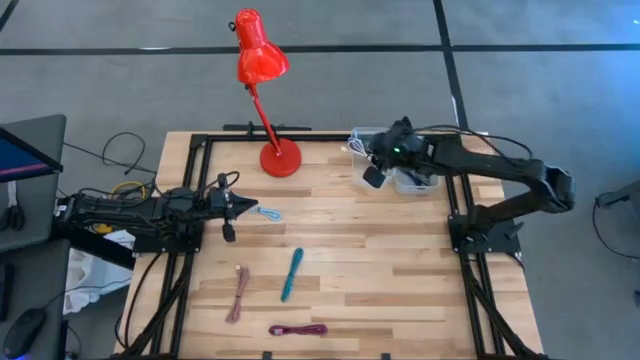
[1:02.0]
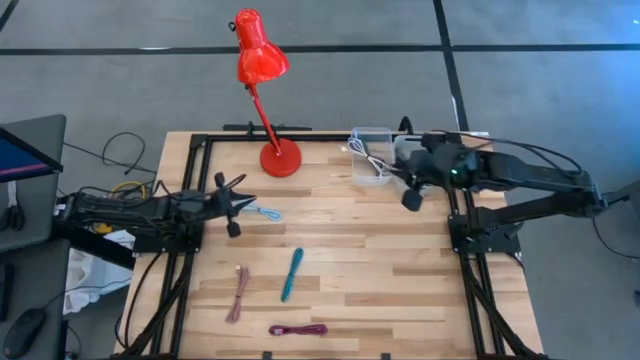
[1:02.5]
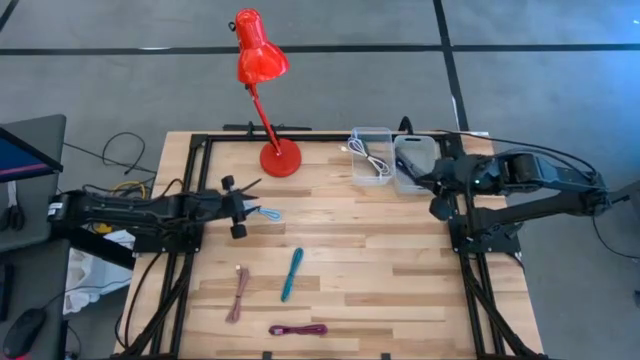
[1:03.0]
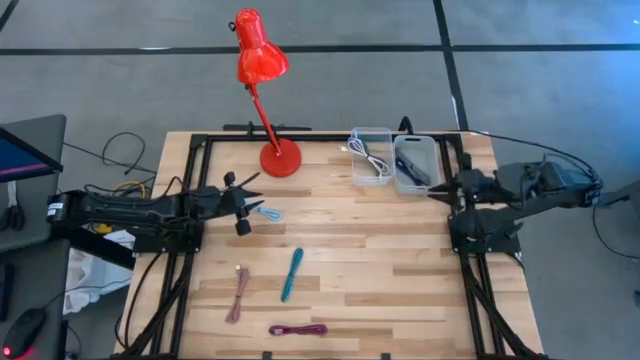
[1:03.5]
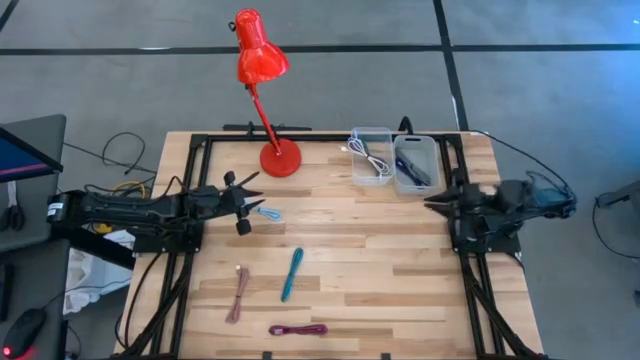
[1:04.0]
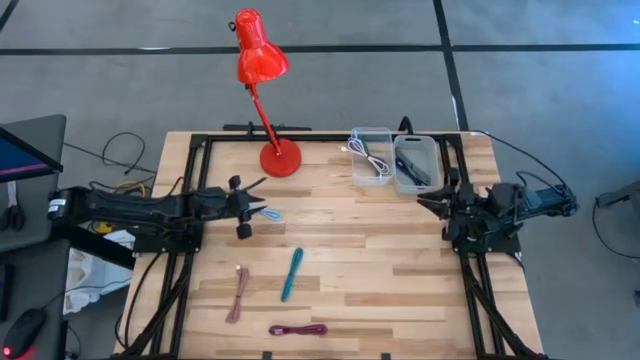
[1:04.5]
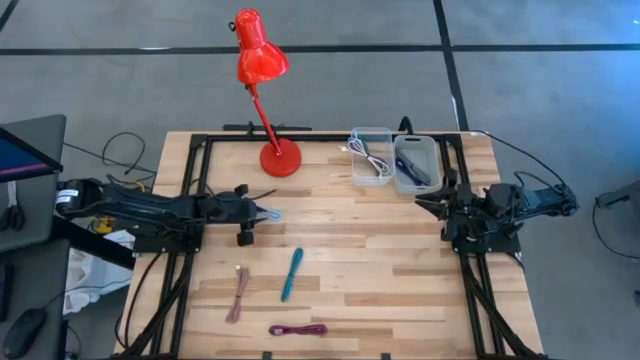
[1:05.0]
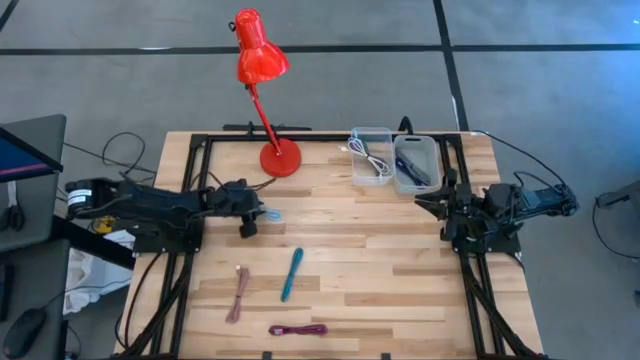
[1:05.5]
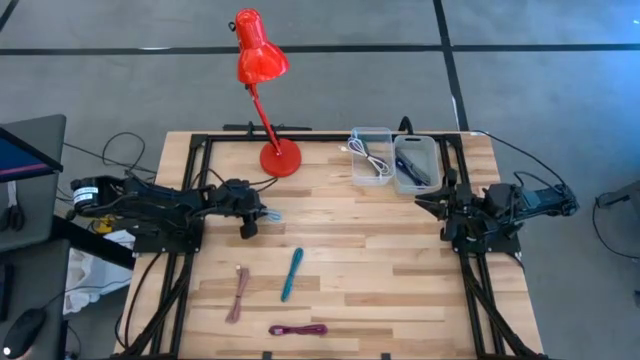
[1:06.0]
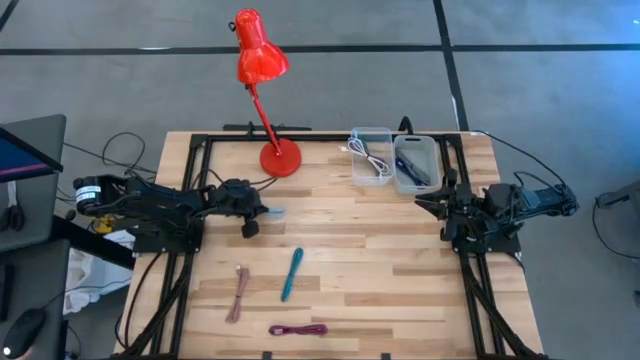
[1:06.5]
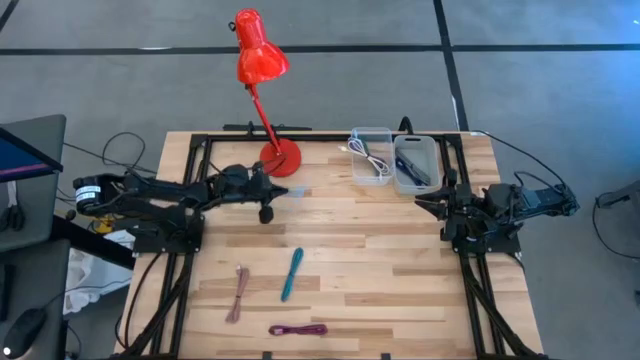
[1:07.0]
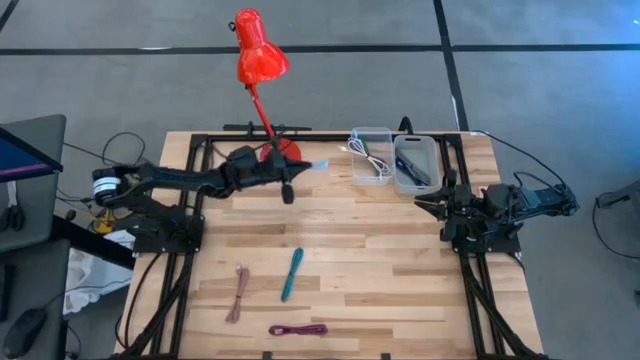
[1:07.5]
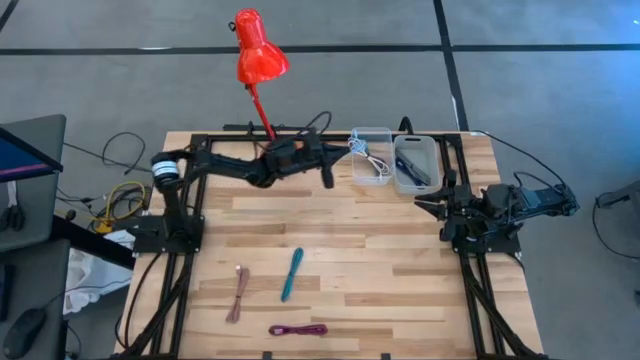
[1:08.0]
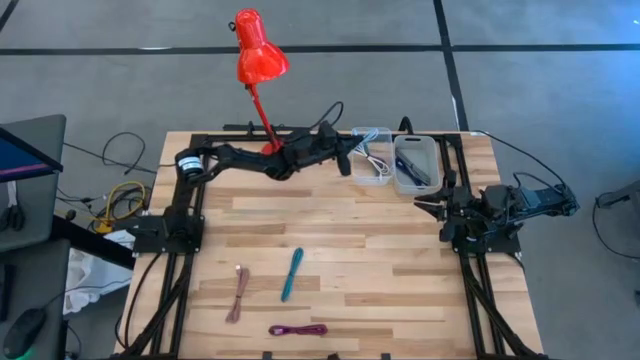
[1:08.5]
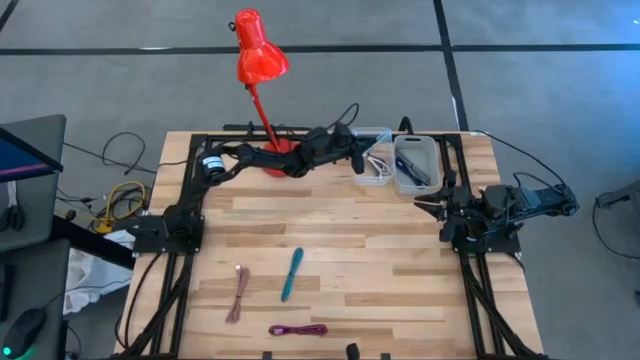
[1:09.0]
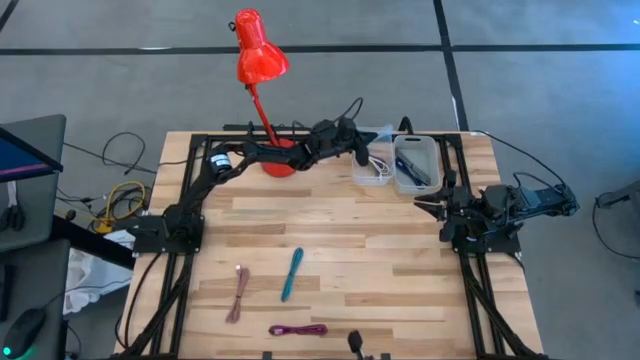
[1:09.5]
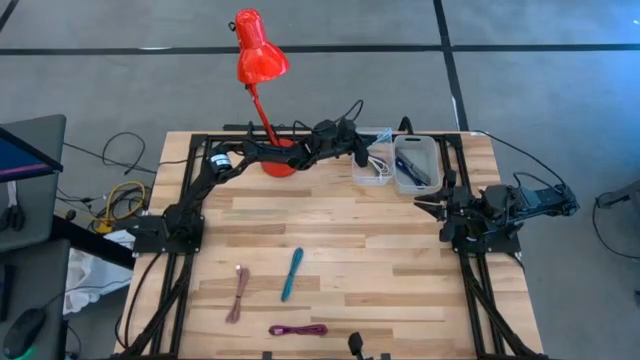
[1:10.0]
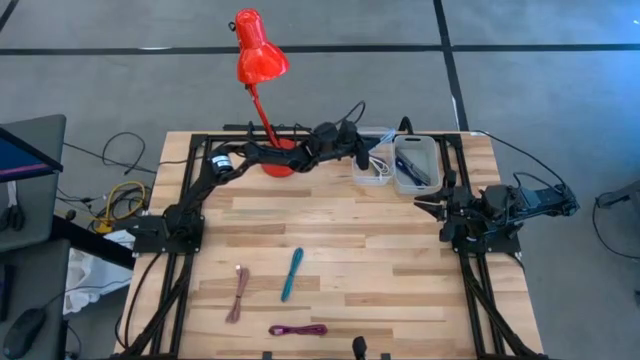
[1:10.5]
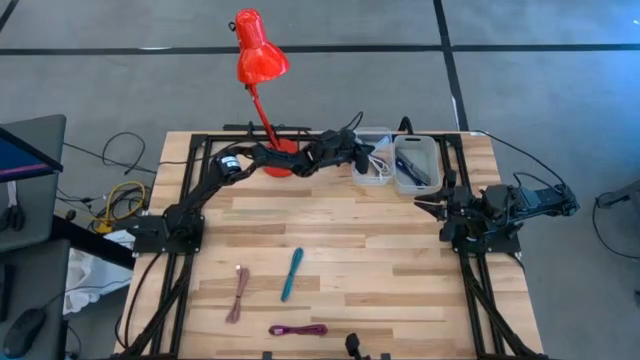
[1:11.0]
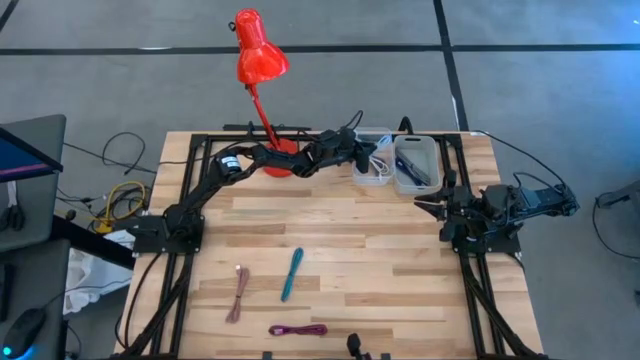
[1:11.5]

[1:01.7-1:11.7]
Task: Pick & Place USB Port
Put the light blue charger cable into the transparent bin

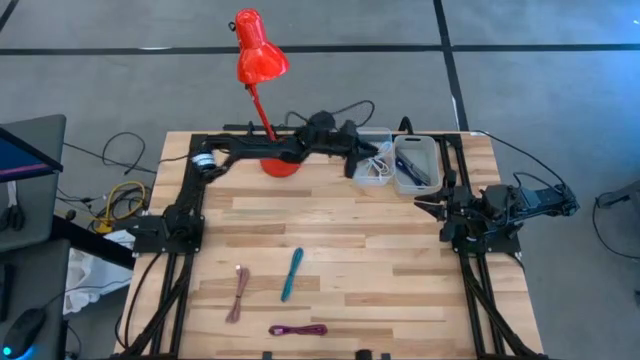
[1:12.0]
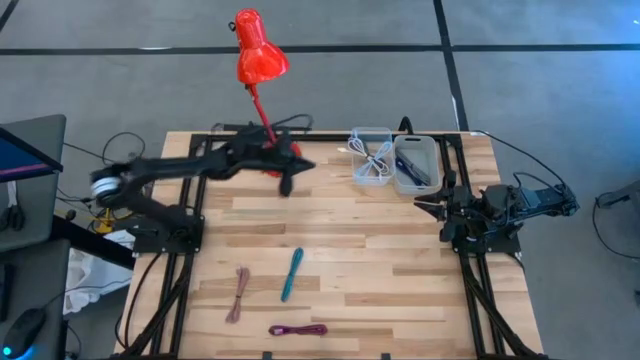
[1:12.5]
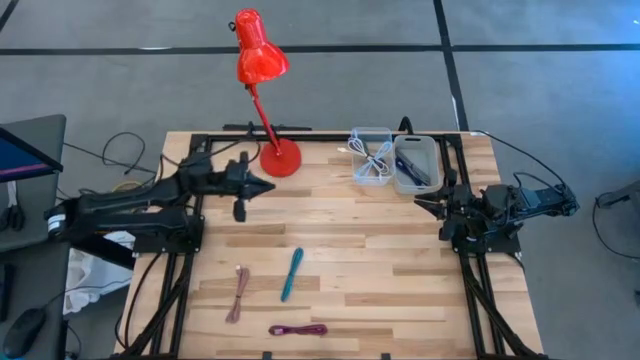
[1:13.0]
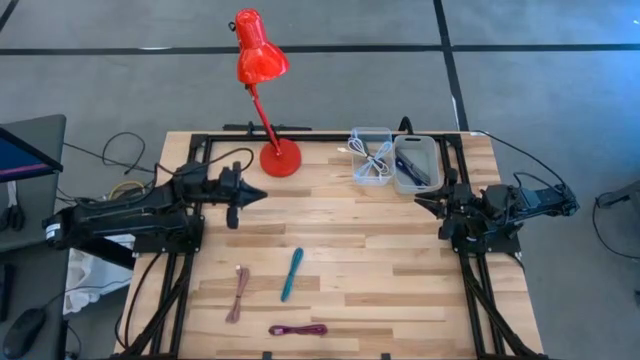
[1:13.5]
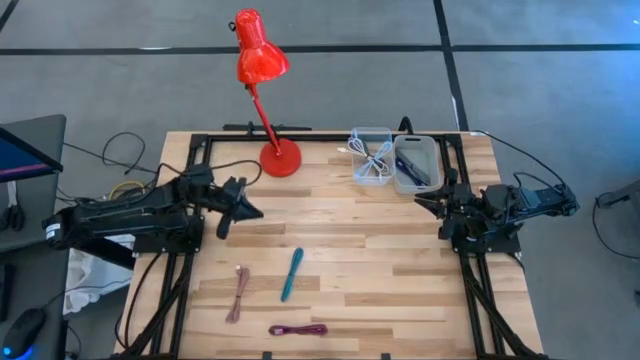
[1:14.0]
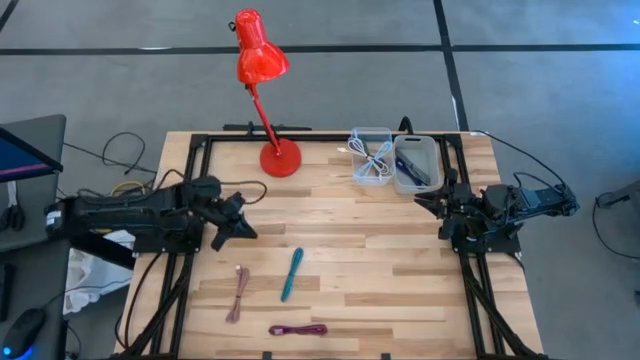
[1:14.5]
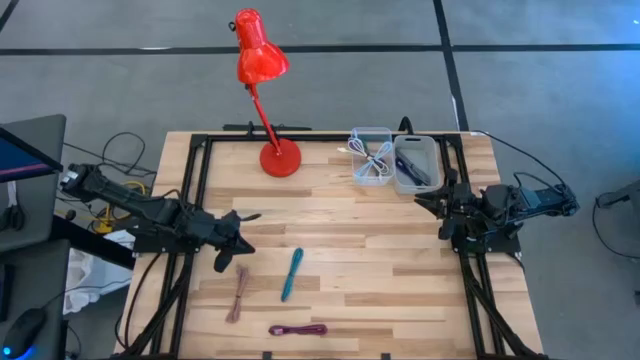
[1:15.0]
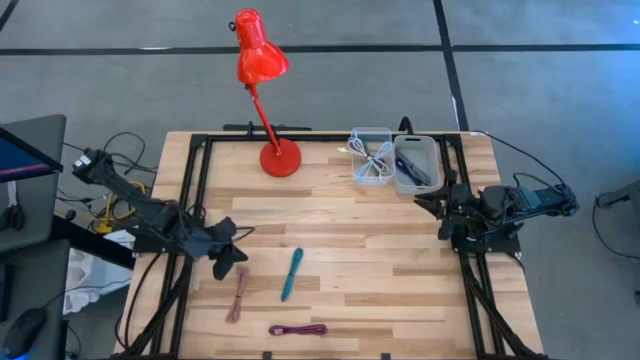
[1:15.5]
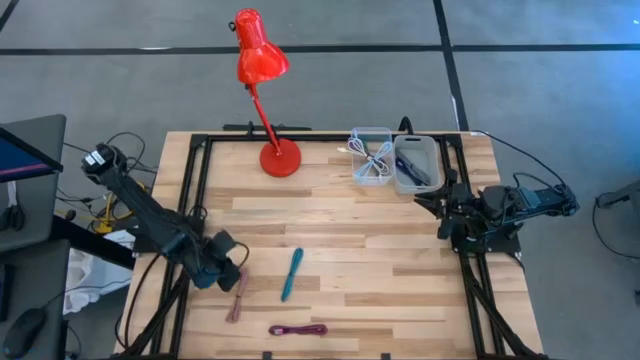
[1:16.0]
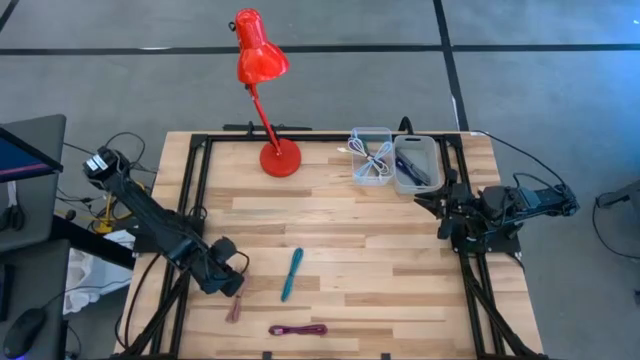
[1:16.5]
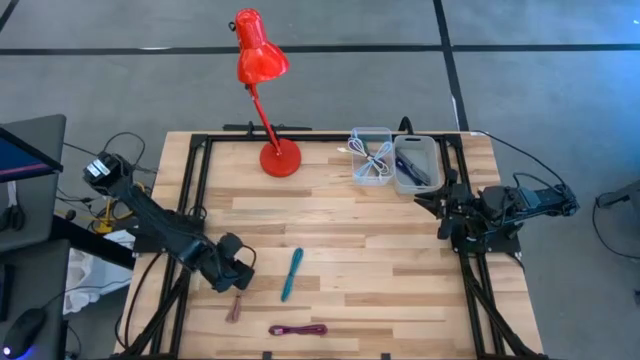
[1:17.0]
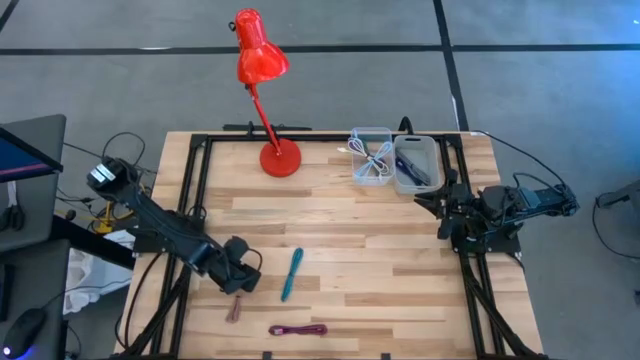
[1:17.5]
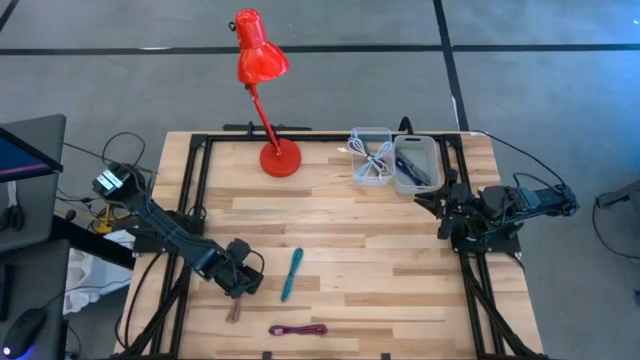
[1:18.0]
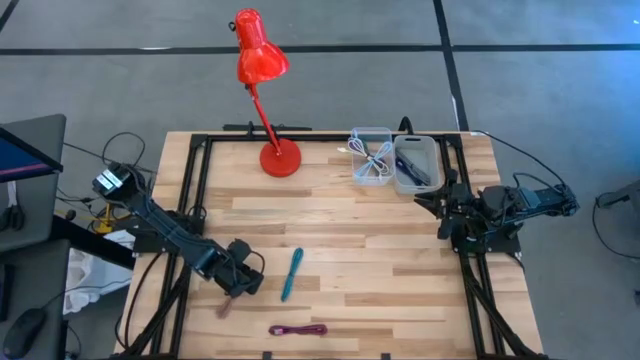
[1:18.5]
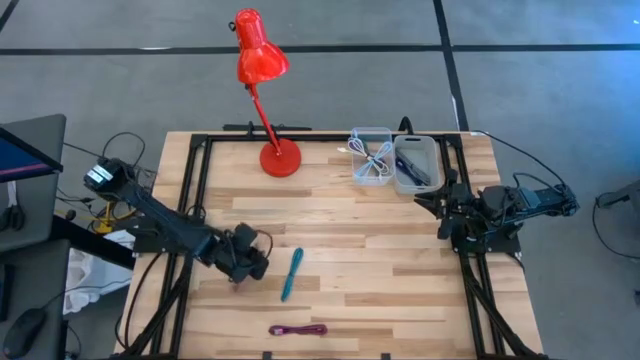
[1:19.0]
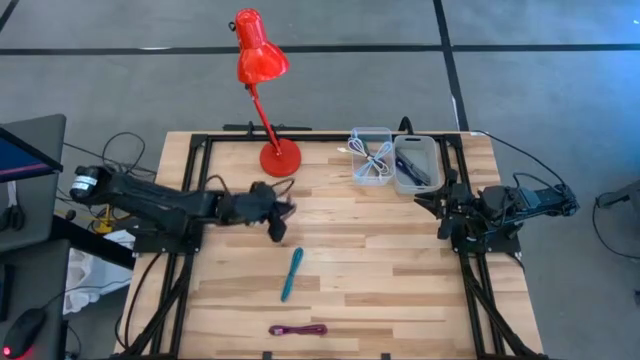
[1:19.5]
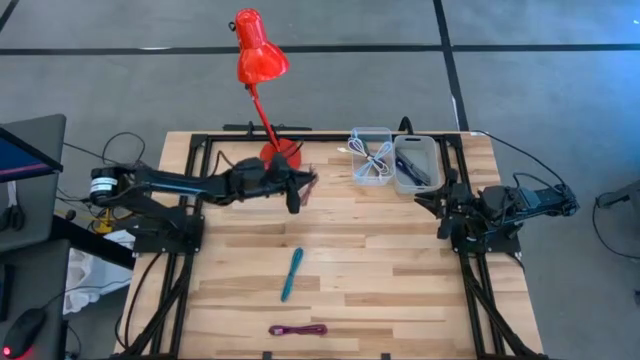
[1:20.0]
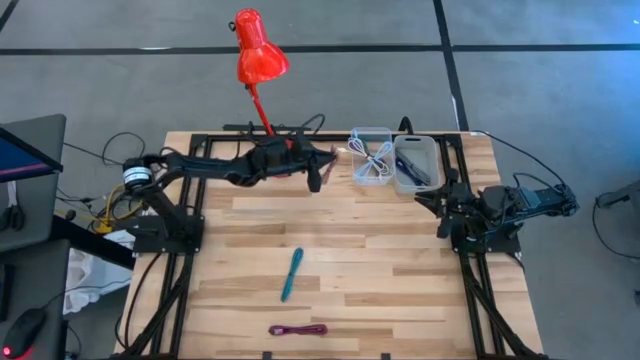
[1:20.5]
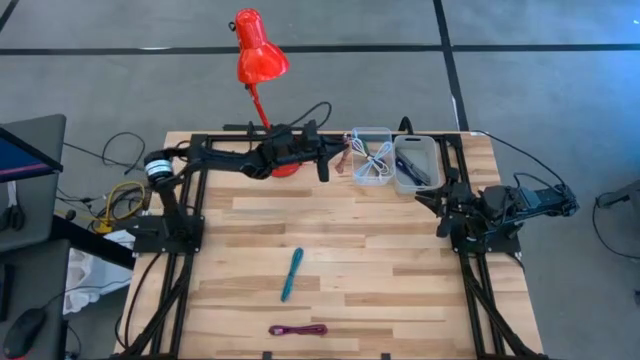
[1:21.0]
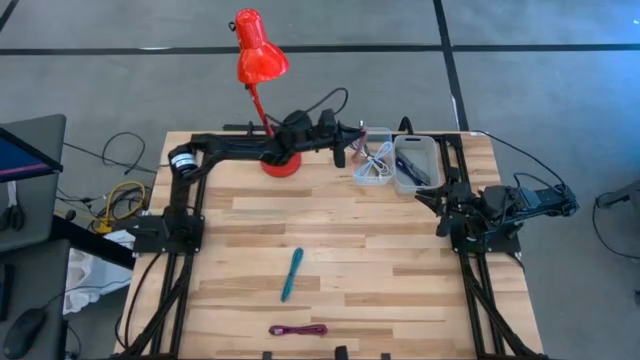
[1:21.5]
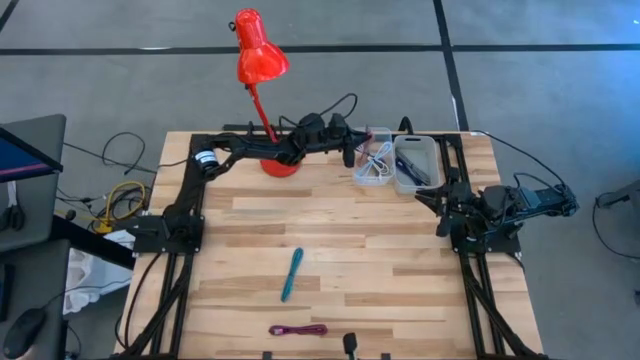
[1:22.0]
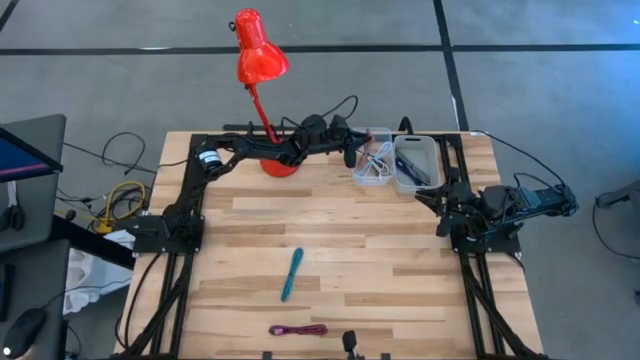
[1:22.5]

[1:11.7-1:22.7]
Put the pink charger cable into the transparent bin
